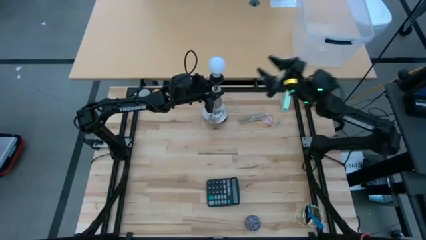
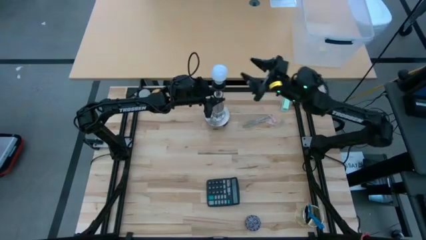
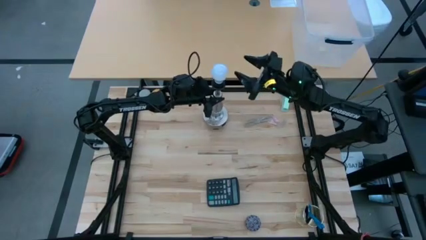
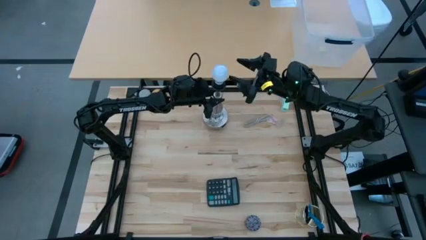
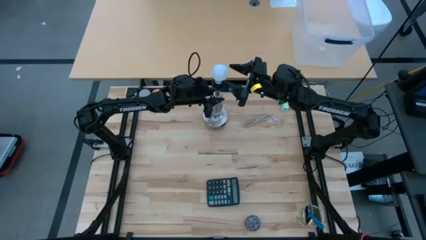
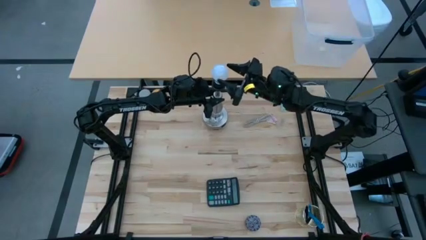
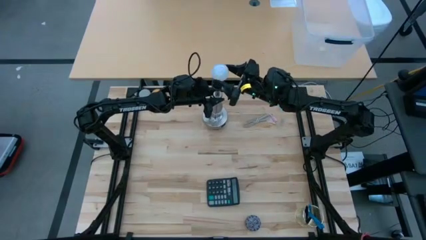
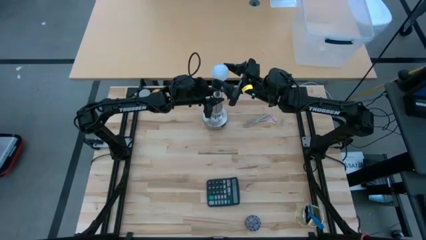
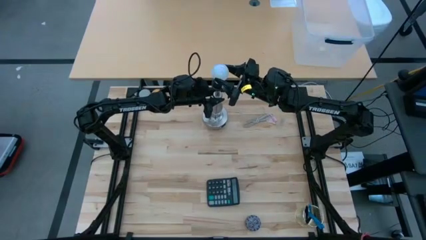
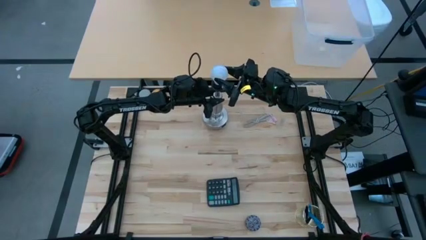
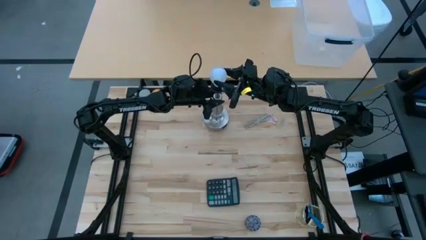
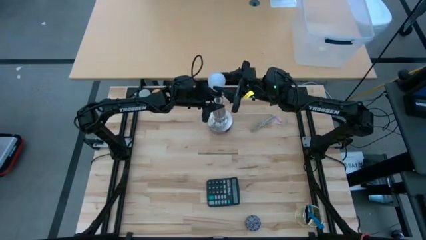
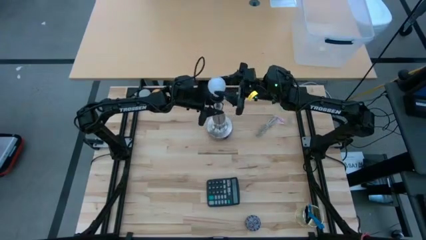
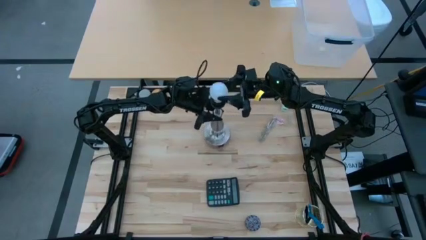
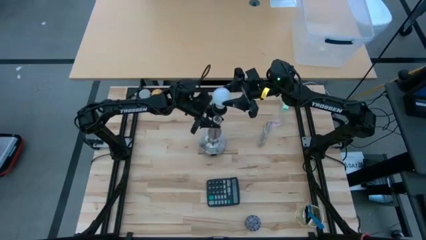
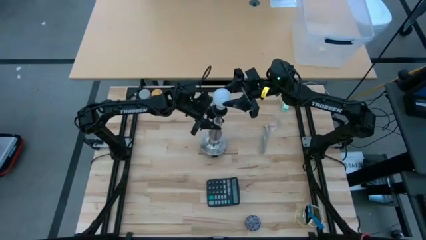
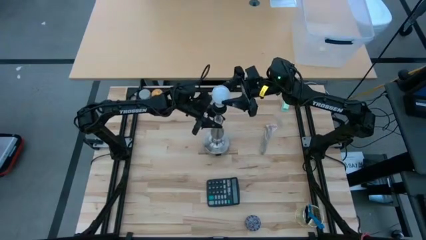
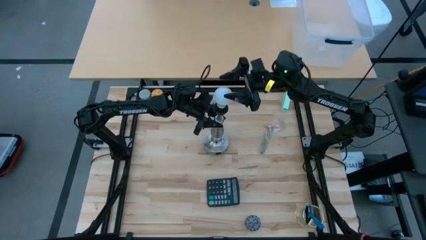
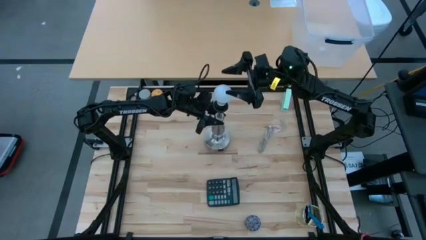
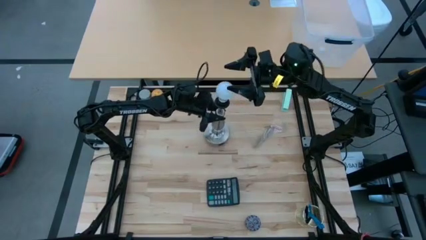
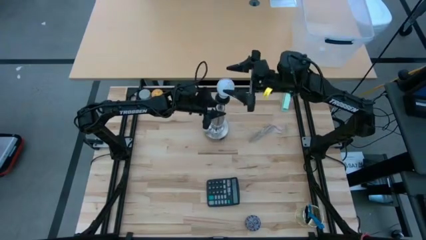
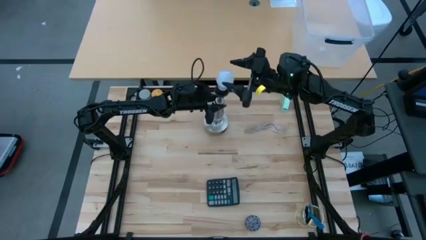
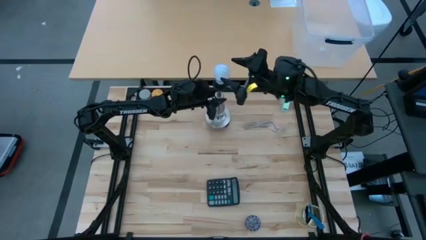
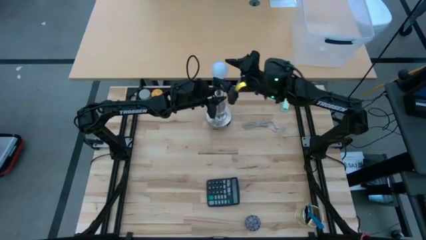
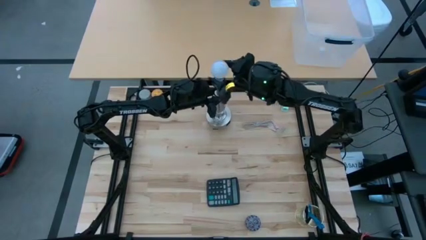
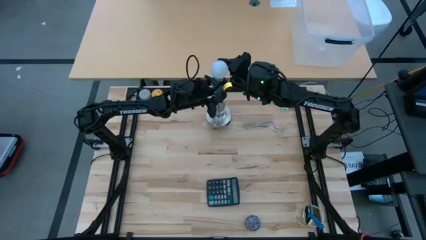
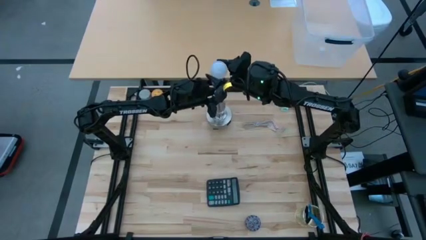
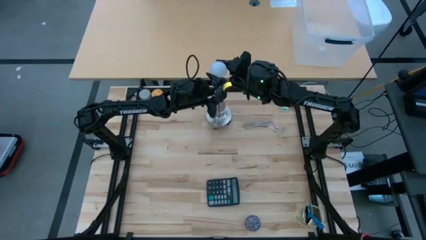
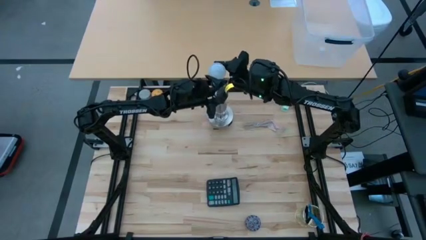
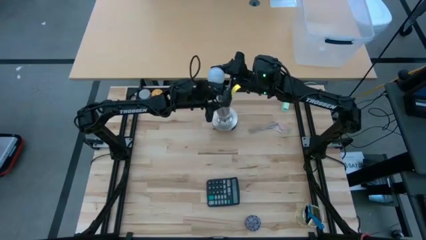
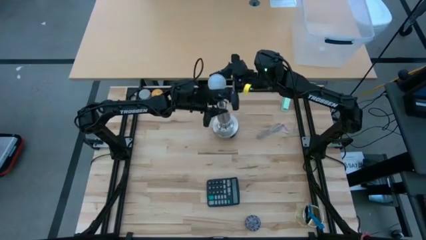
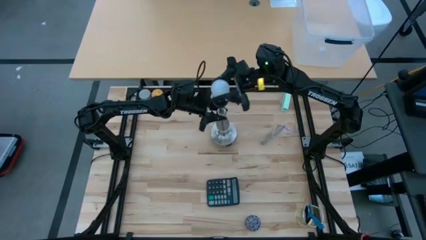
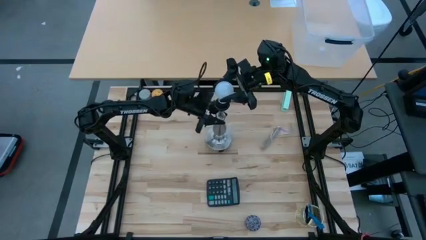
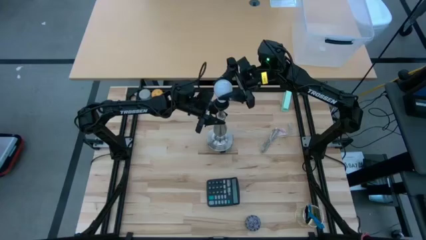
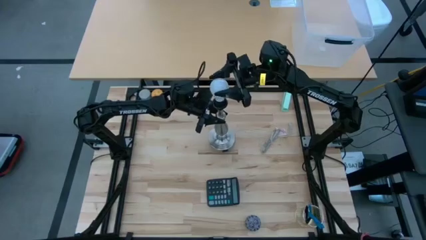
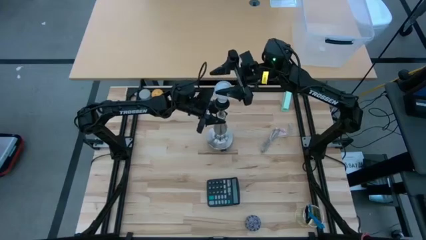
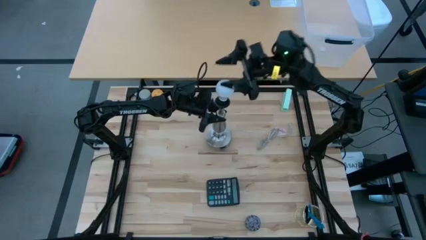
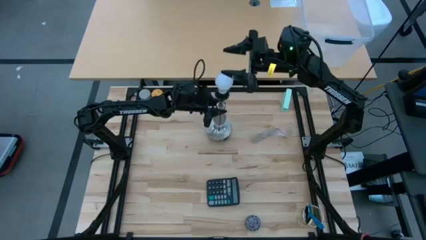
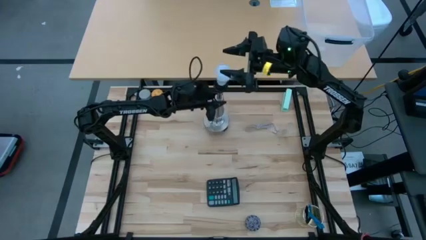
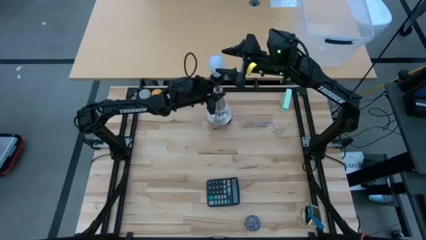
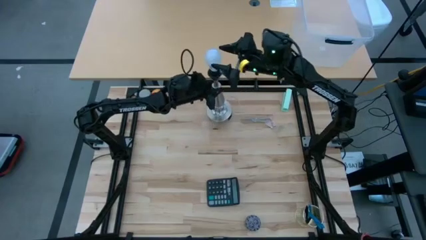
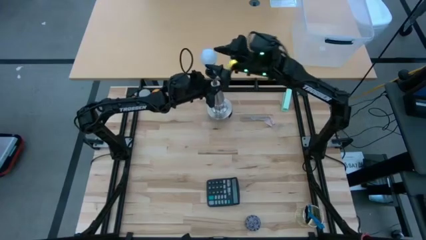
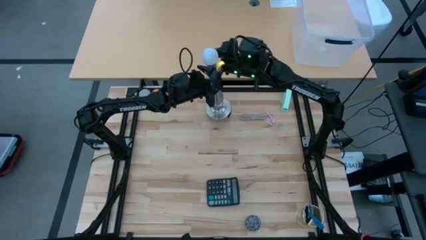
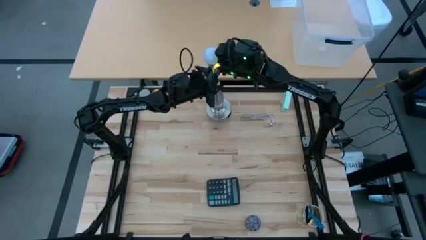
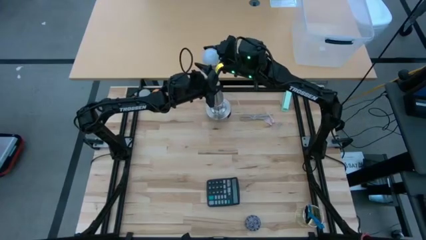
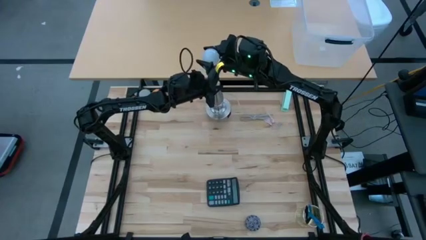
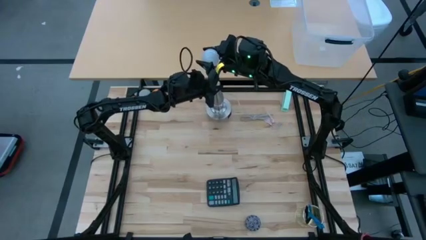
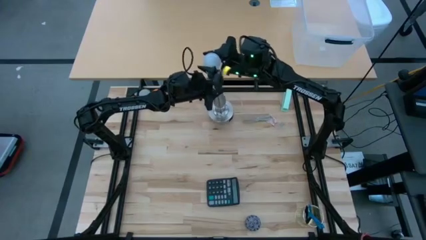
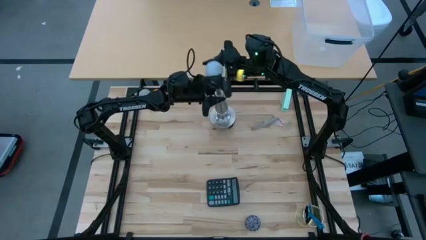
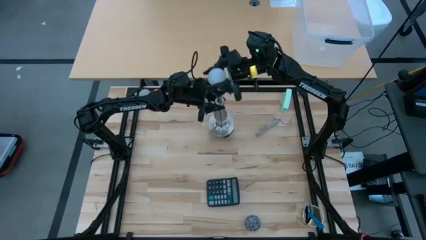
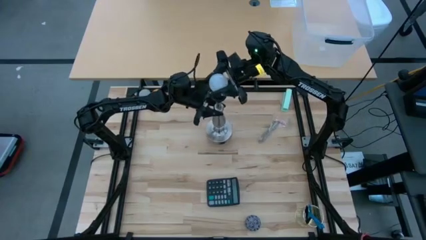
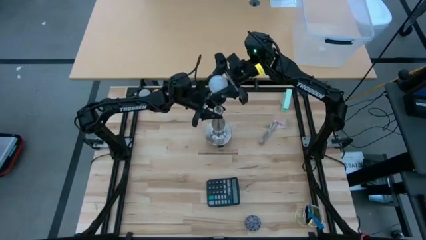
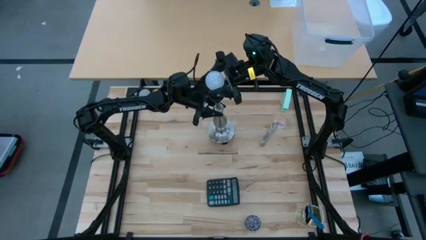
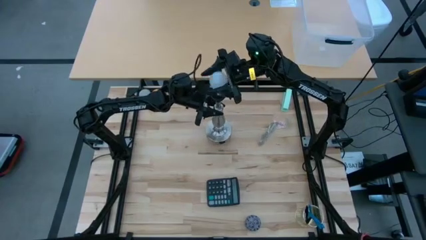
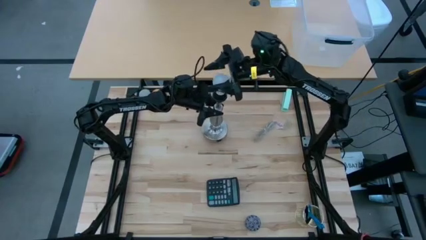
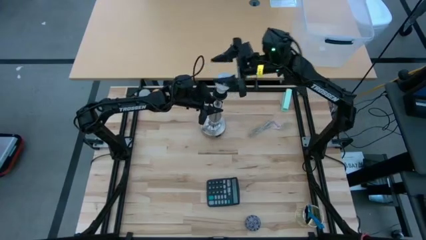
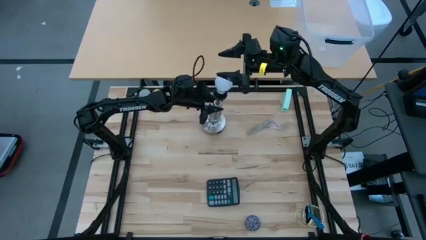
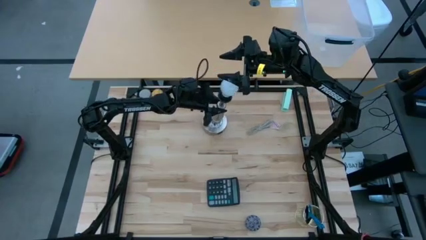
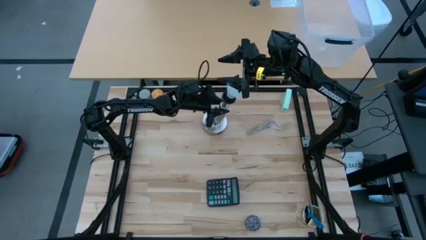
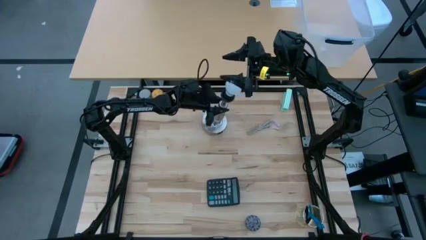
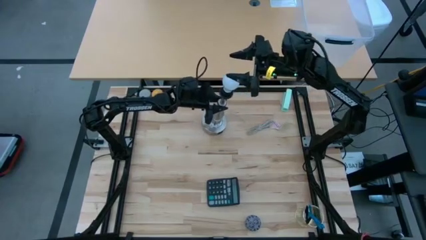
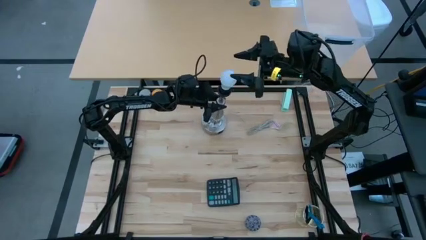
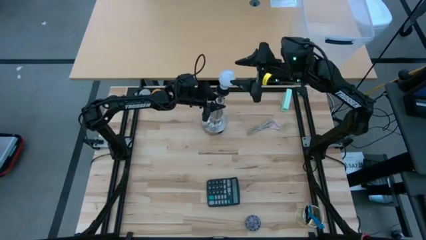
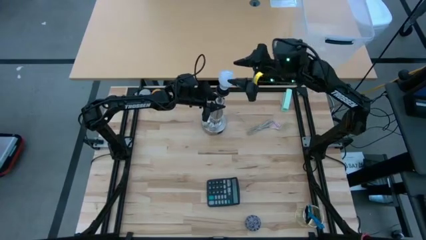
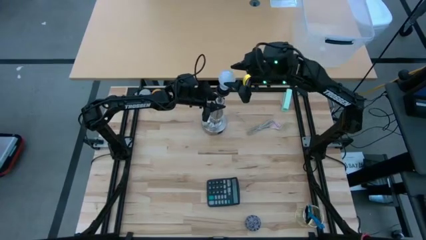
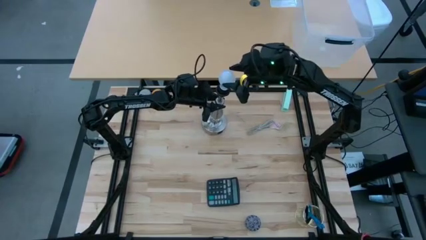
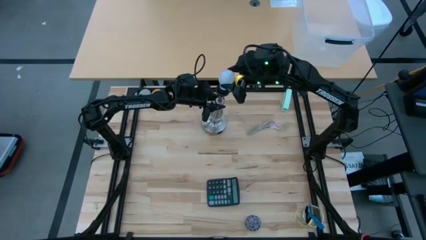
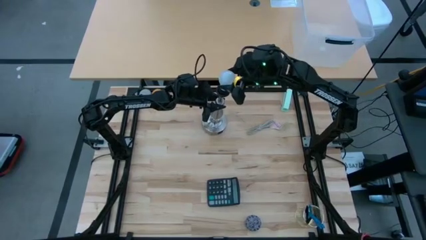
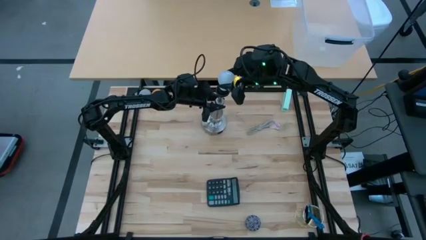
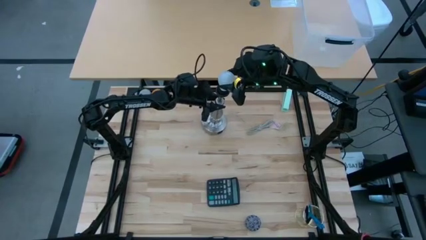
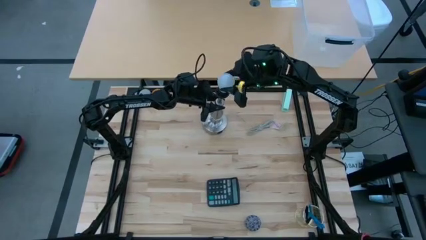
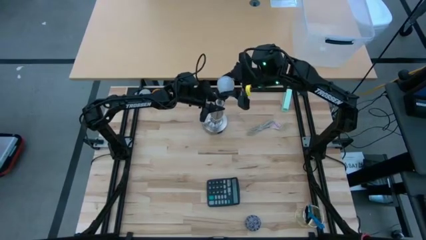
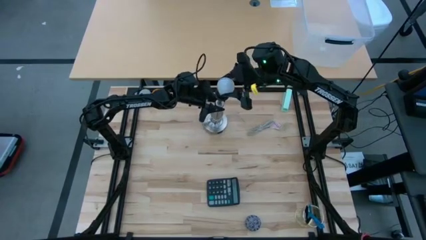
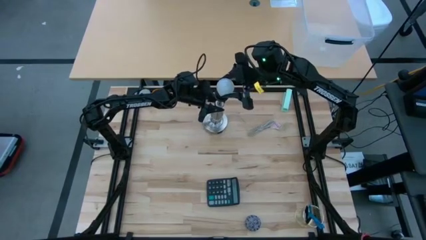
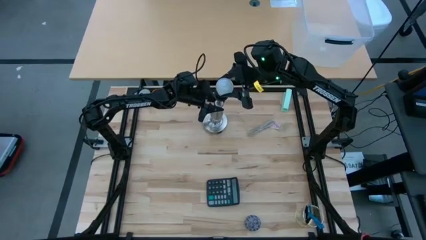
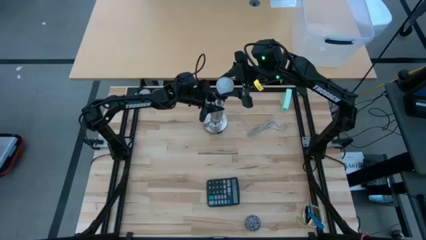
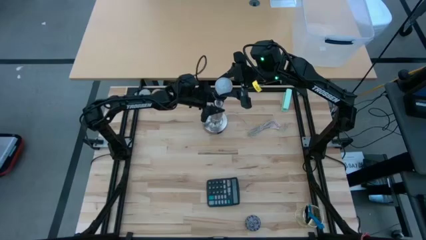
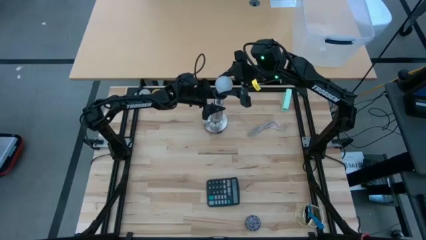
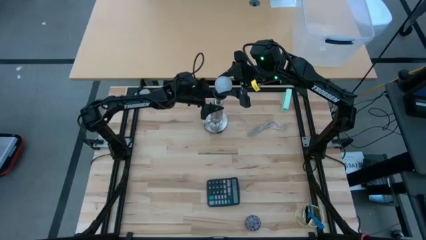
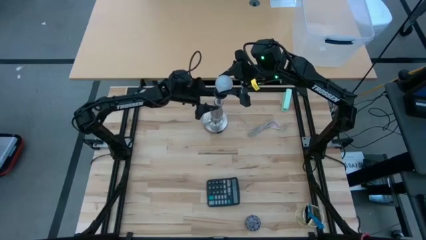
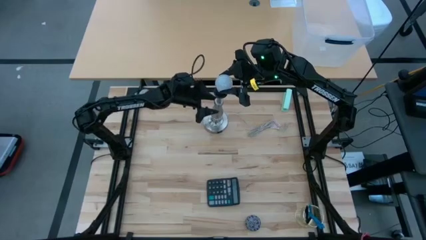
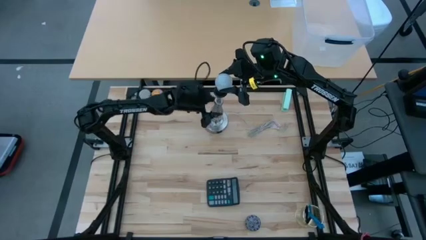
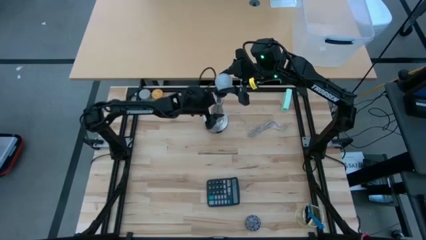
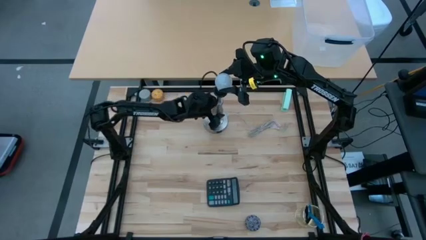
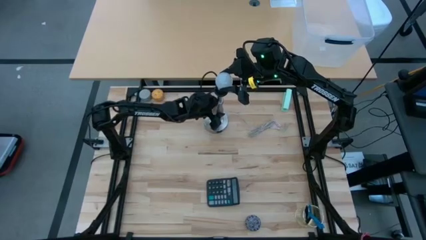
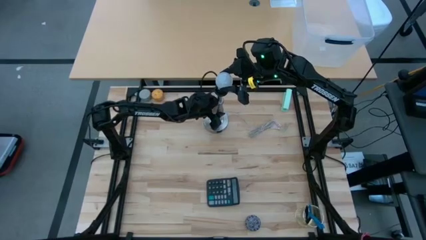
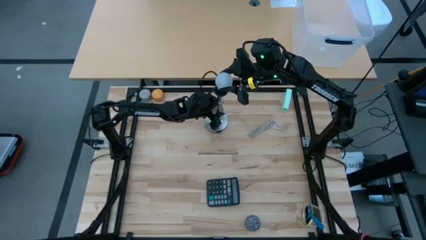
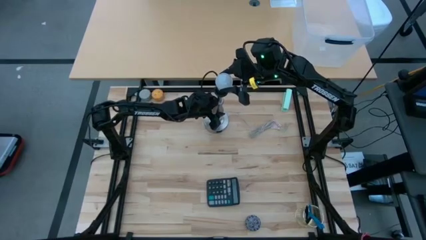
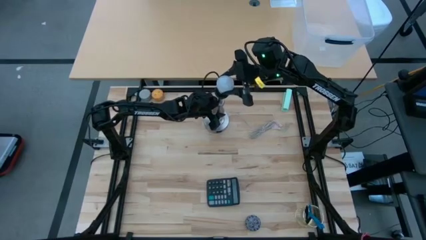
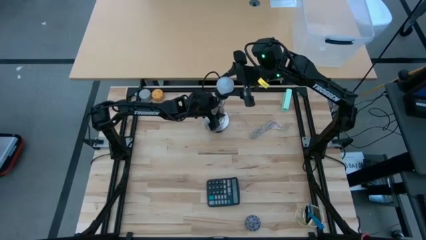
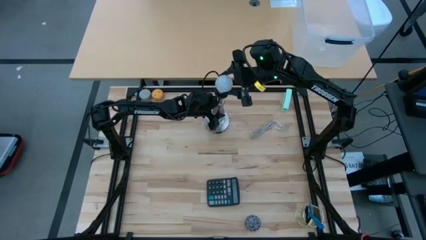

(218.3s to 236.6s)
Task: Screw lightbulb
Remove the light bulb from the lamp
